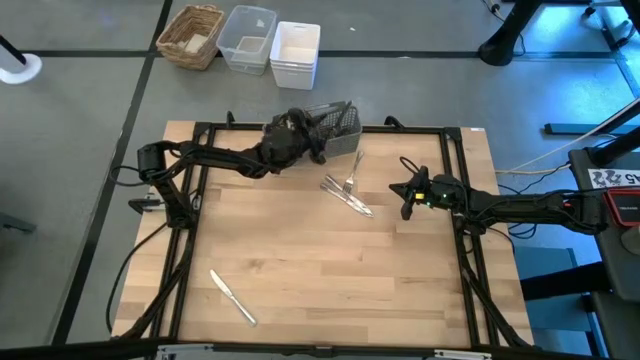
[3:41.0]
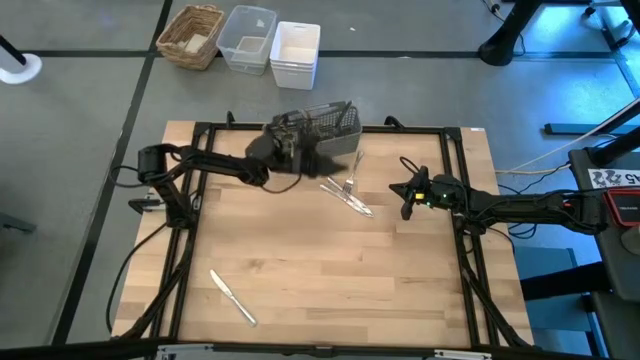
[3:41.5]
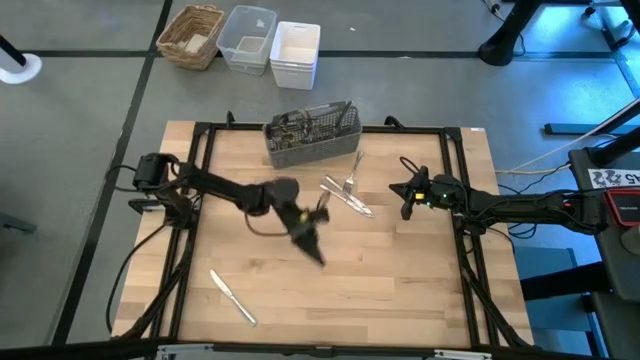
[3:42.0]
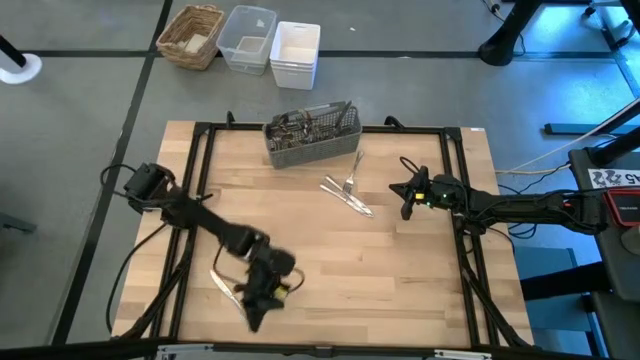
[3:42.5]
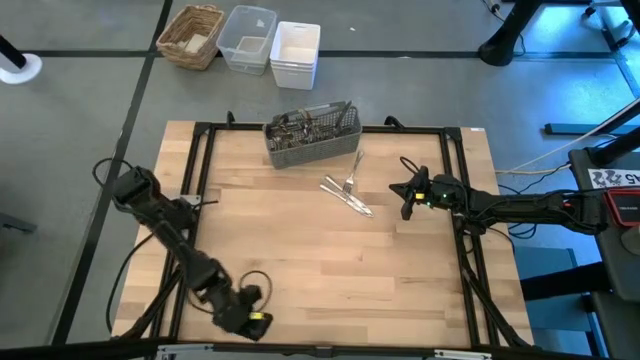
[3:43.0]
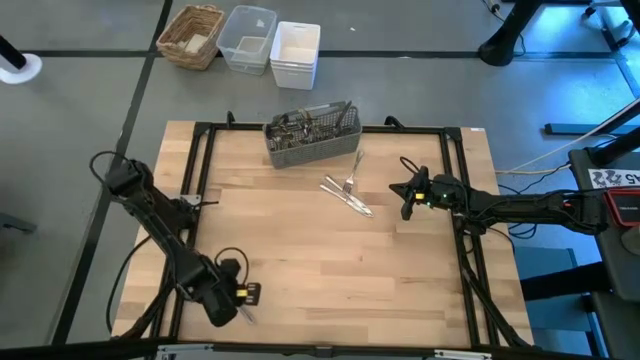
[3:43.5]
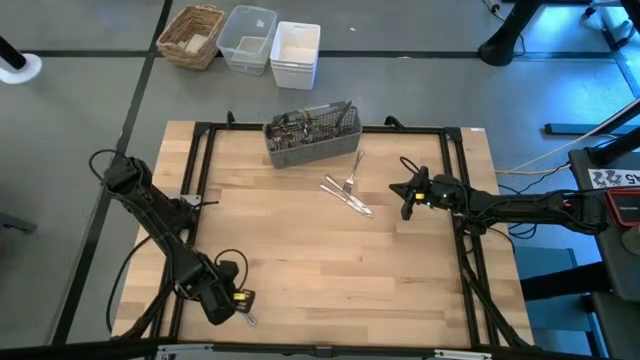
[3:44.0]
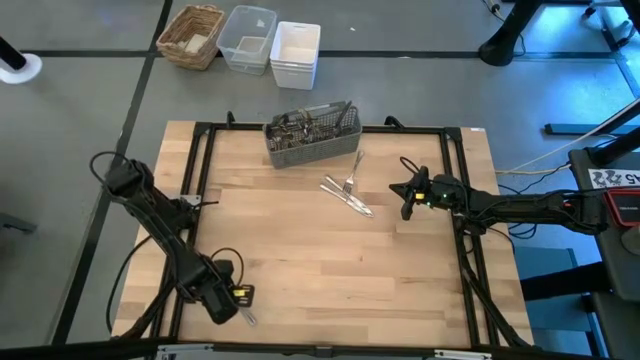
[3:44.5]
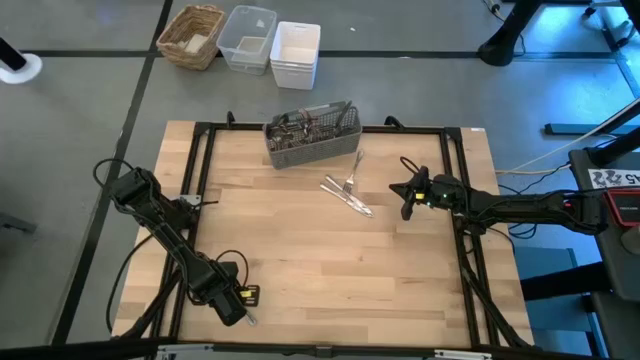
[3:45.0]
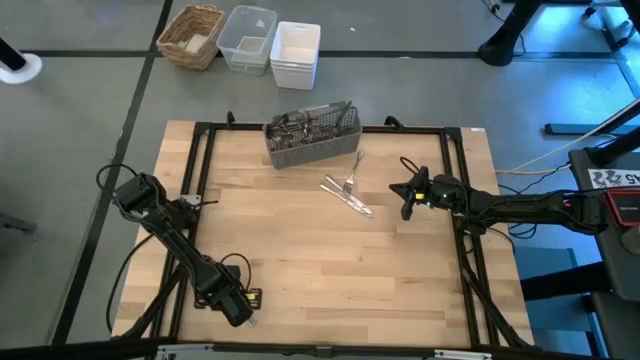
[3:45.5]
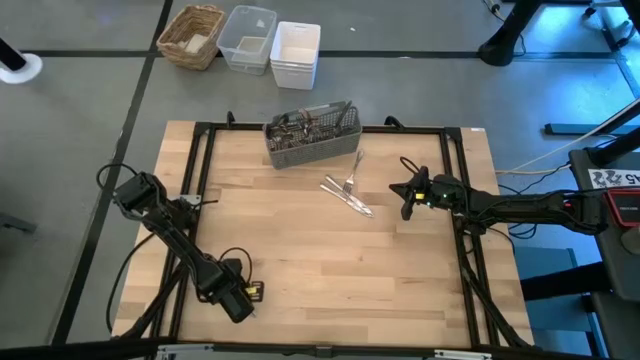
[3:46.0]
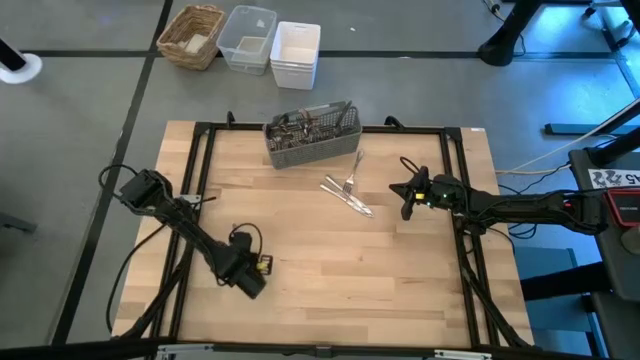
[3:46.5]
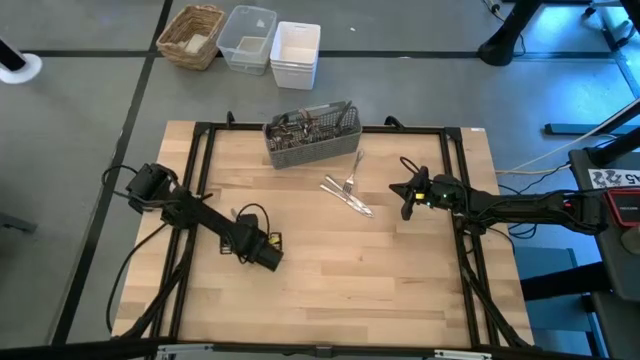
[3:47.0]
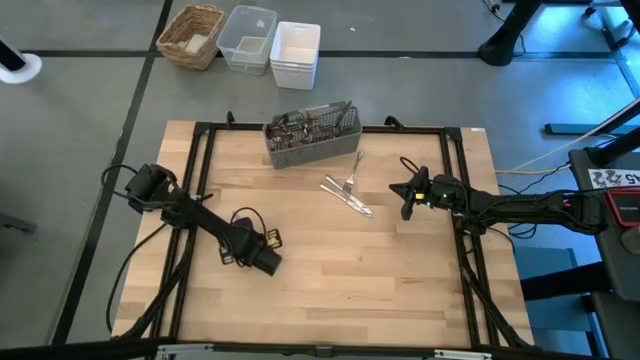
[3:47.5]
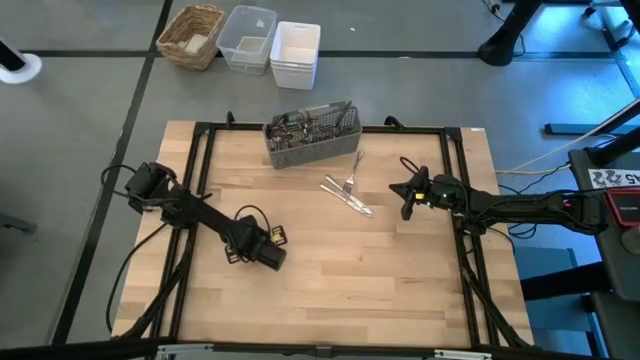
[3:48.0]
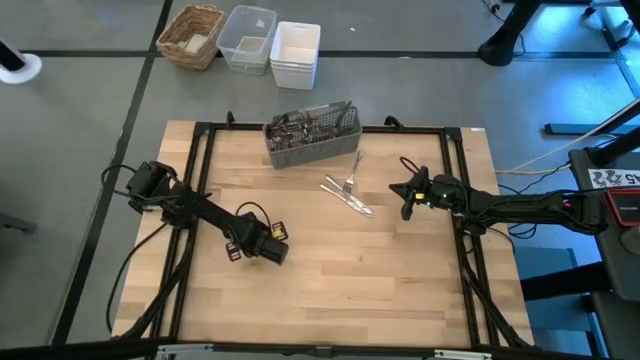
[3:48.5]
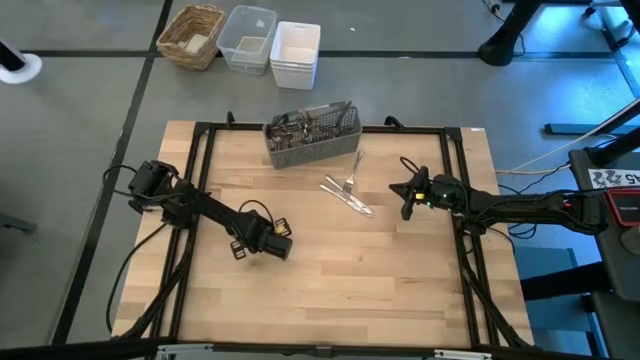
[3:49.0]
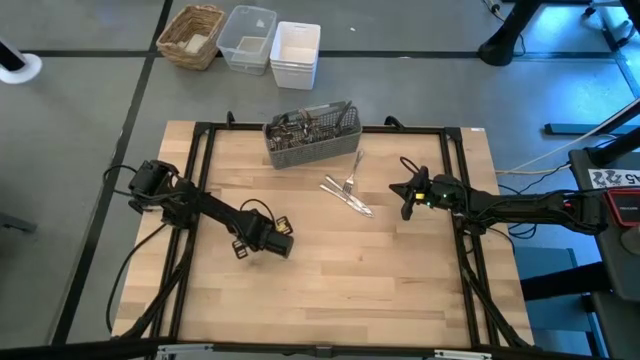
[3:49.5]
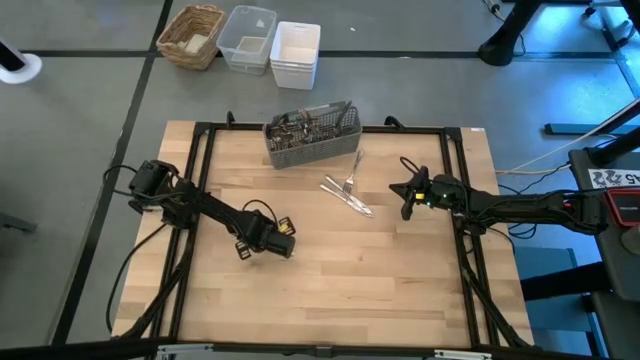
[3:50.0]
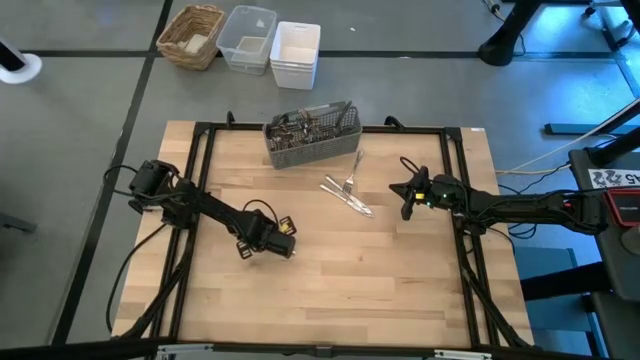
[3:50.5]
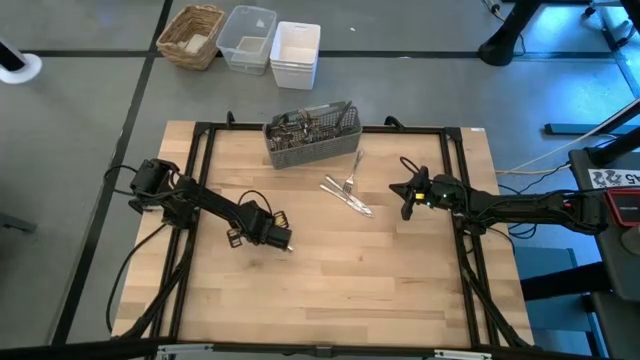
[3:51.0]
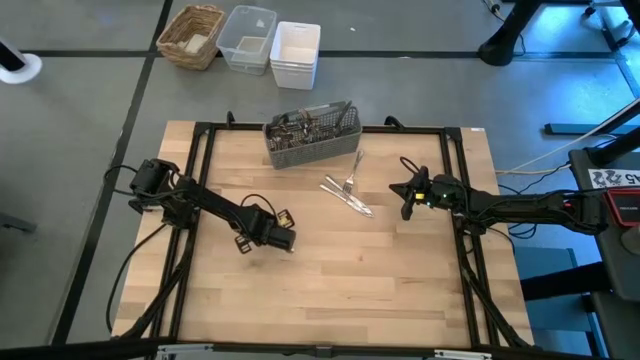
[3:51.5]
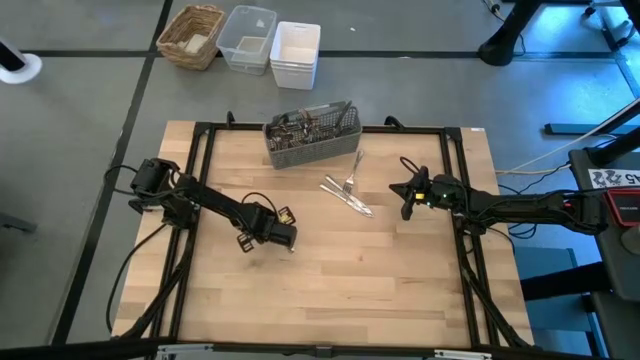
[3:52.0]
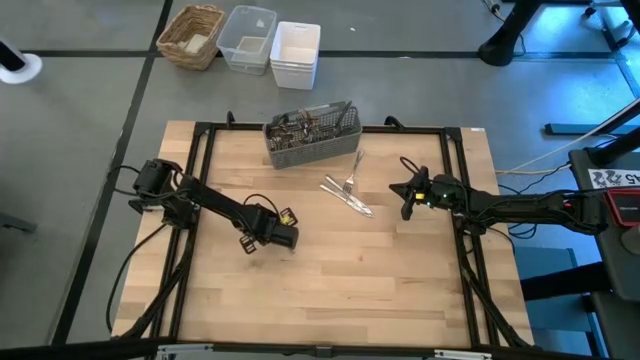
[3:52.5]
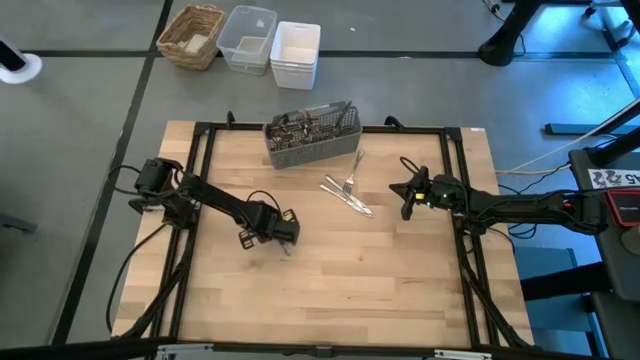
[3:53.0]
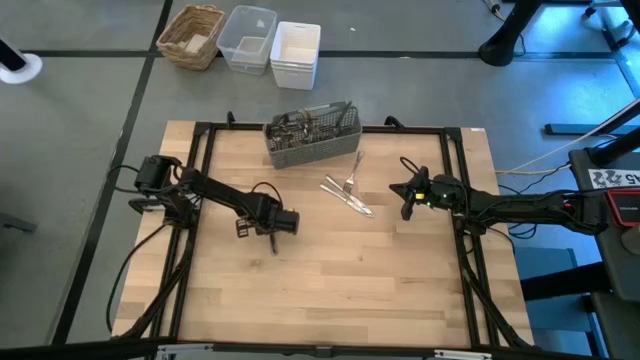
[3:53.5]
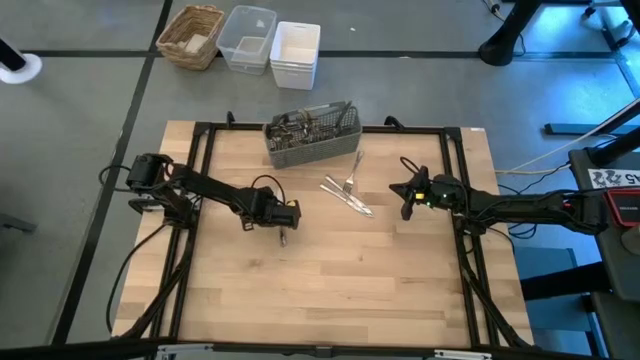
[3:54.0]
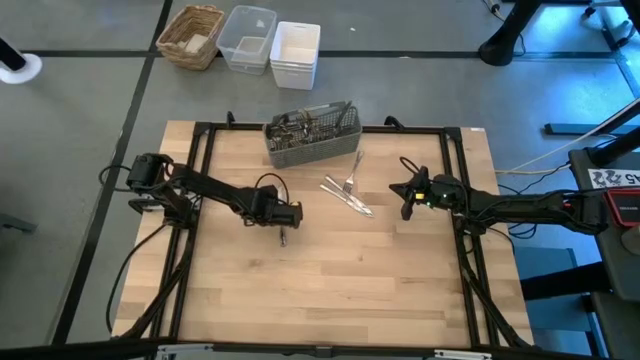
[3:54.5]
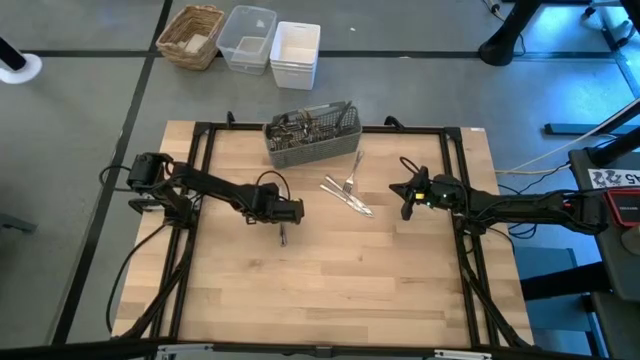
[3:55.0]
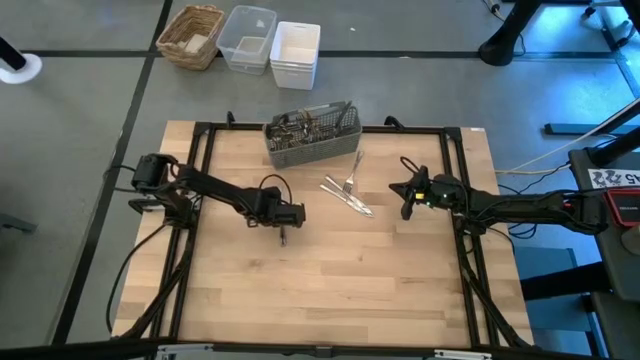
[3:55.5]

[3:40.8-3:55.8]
Task: Sort silverware
Put the silver knife into the silverware rack

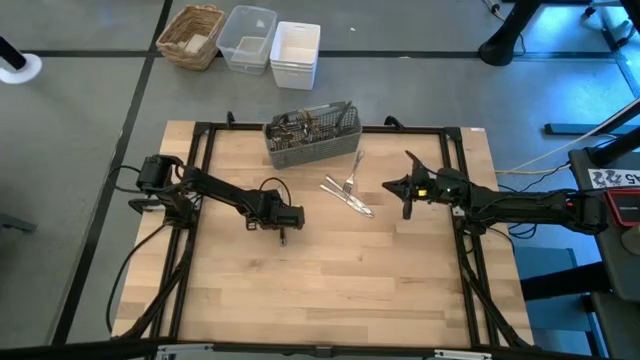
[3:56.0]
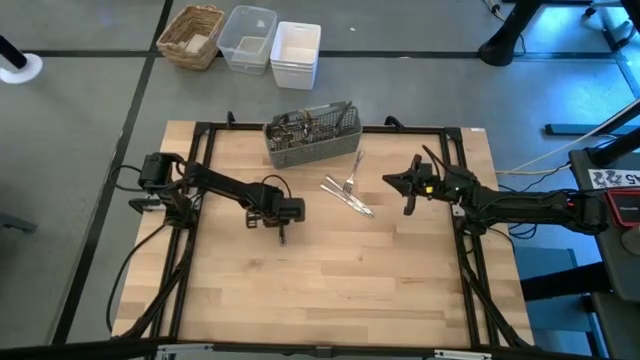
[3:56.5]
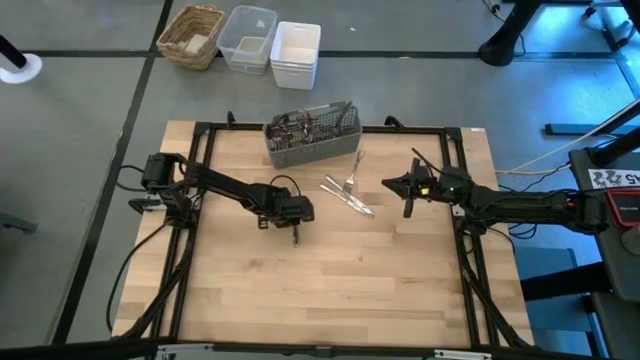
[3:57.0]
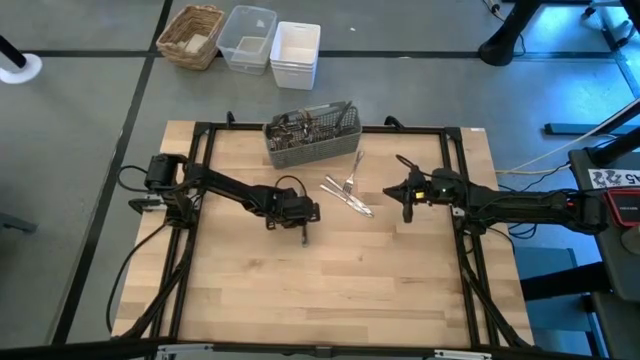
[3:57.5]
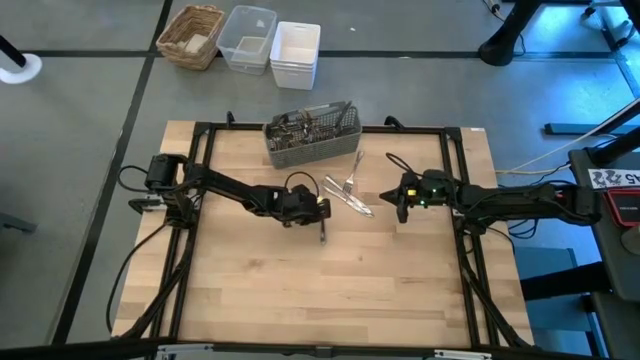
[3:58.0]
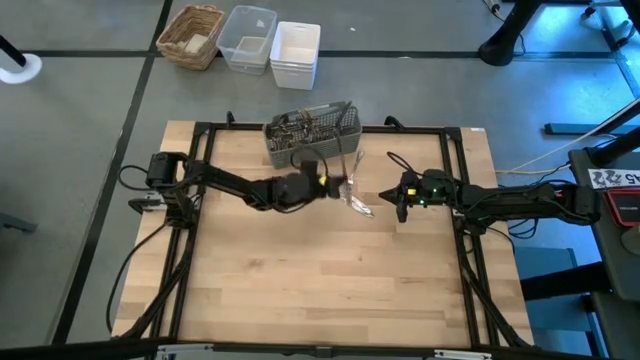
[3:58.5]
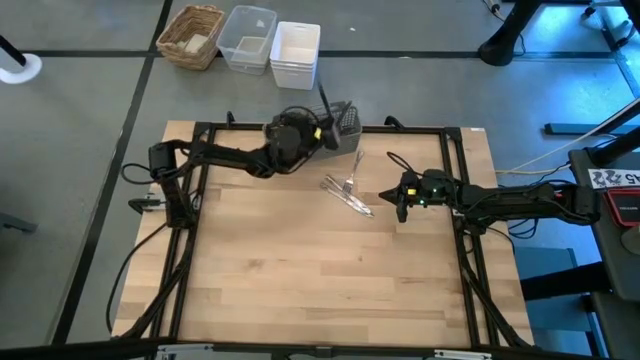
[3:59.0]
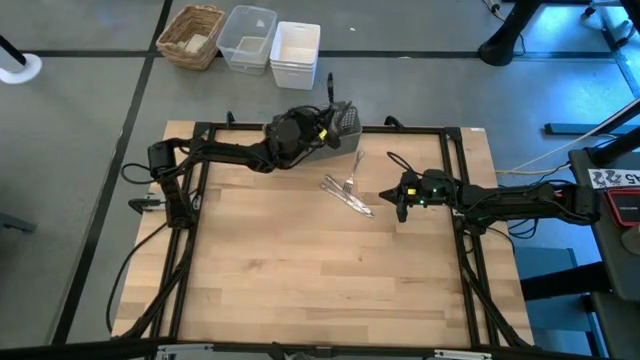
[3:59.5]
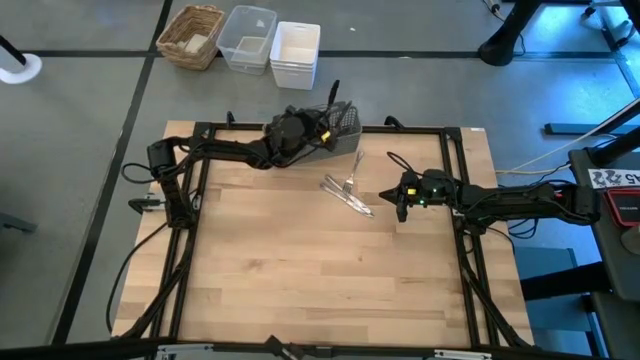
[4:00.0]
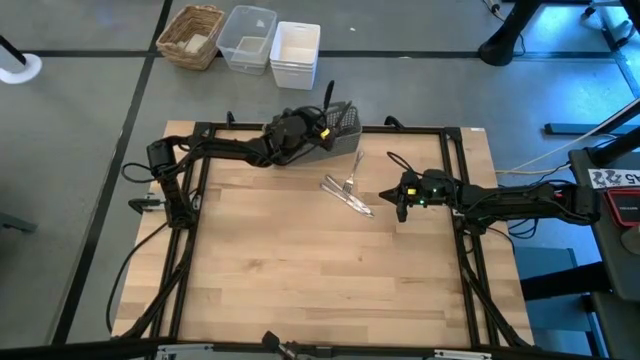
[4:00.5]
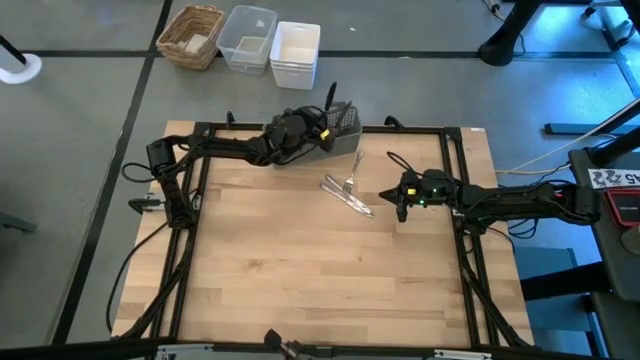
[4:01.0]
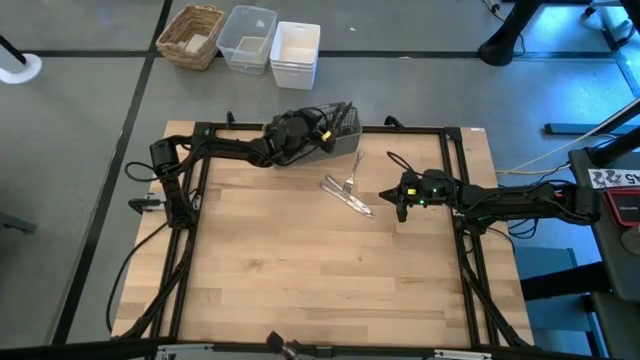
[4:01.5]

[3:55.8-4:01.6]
Put the silver knife into the silverware rack

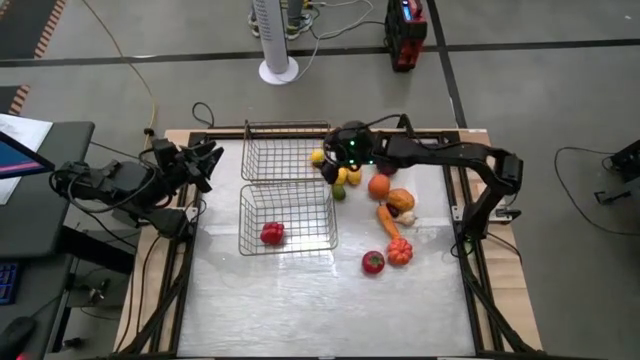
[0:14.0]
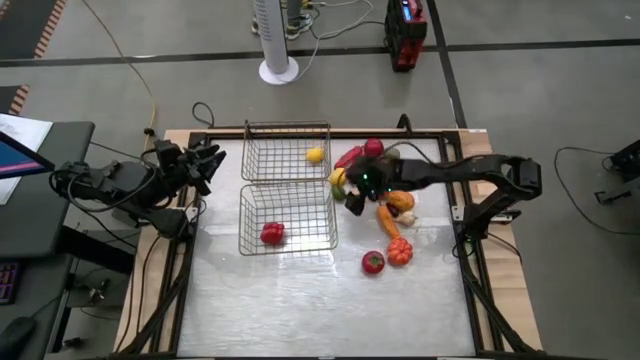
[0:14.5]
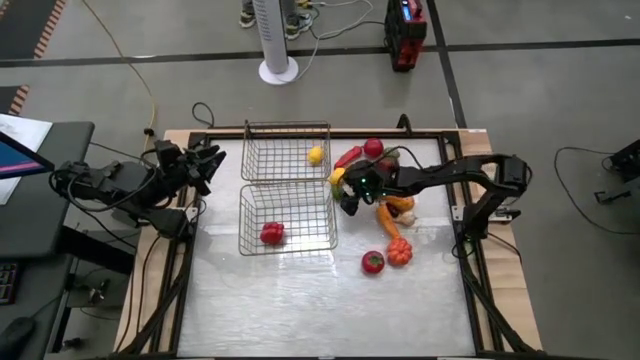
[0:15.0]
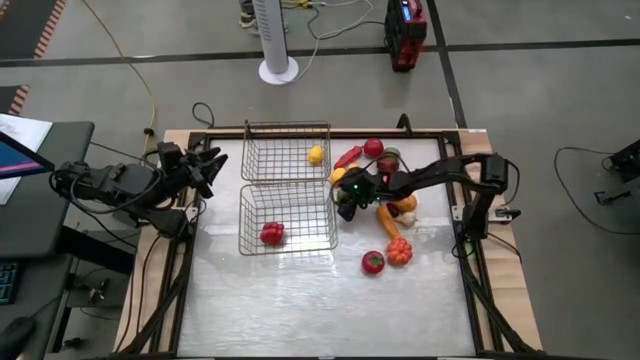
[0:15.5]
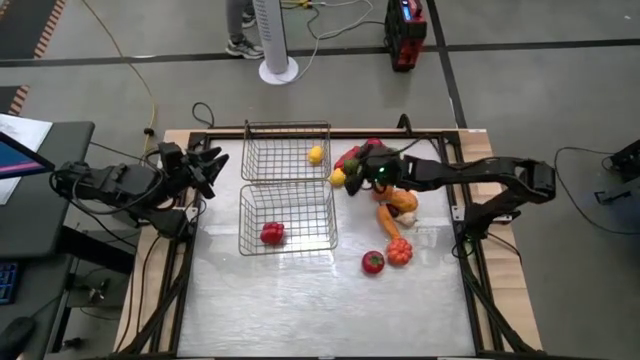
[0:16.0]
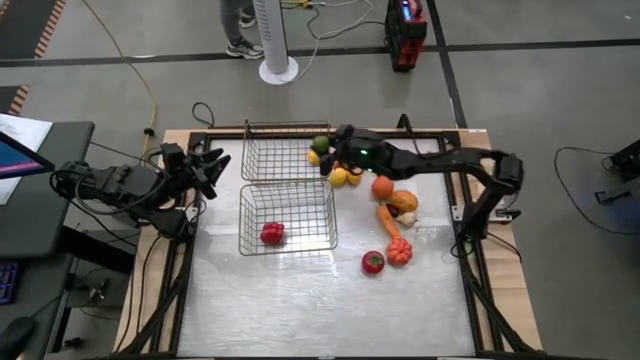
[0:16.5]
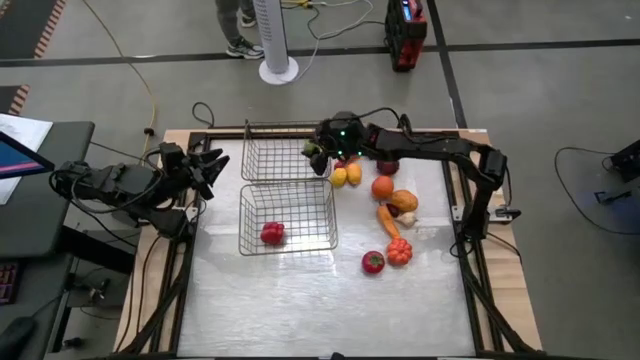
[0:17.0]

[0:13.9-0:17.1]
Task: Sort produce into baskets
Put the green lime into the top mesh basket
